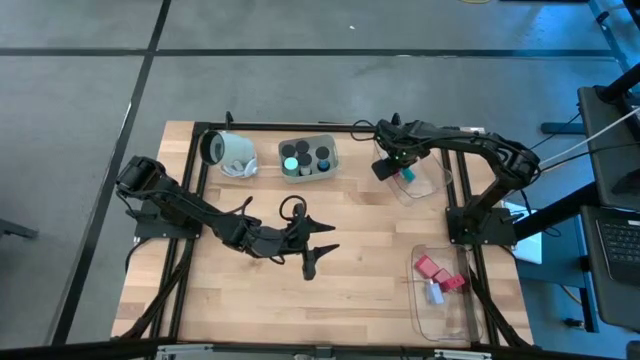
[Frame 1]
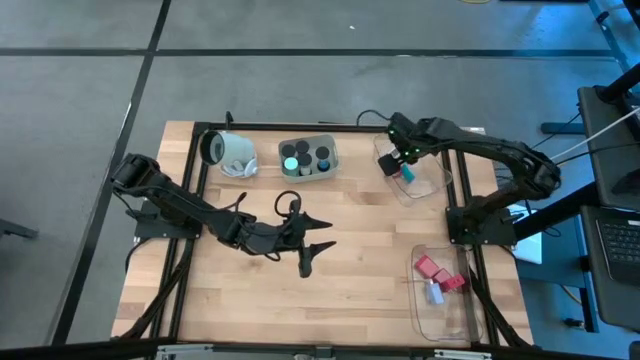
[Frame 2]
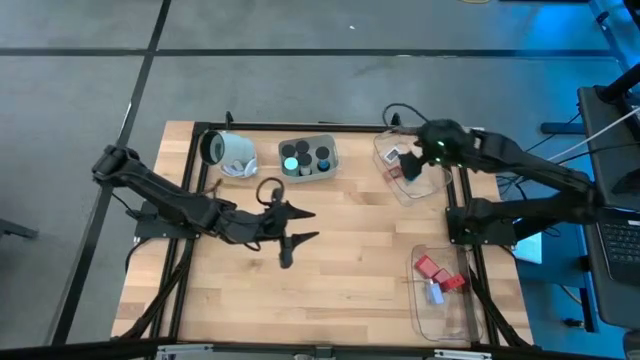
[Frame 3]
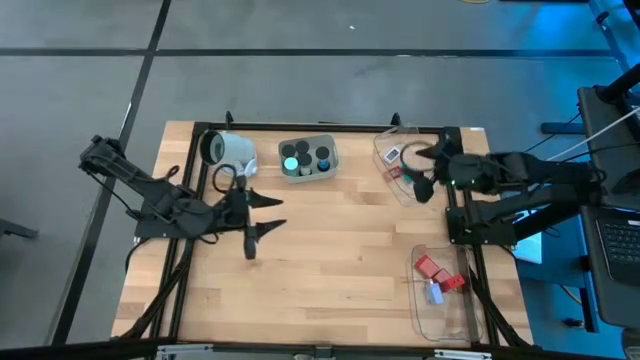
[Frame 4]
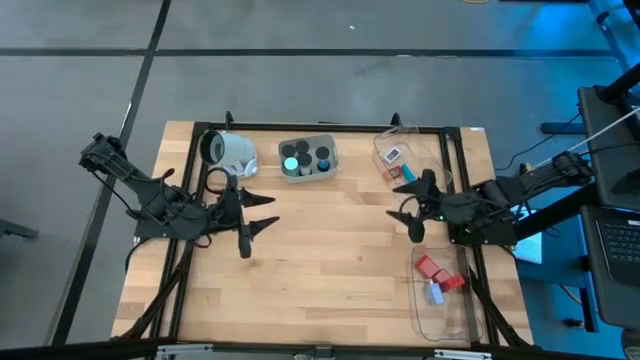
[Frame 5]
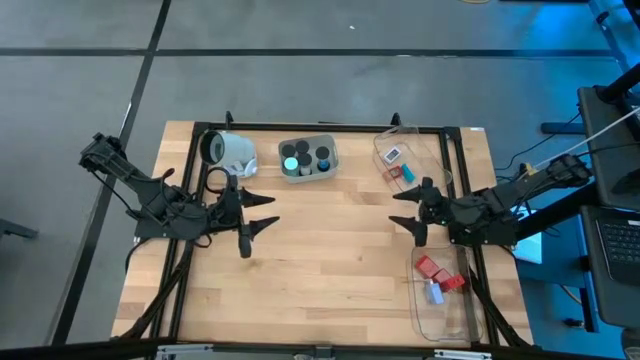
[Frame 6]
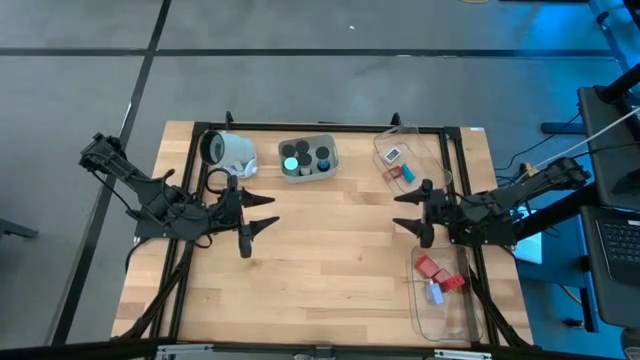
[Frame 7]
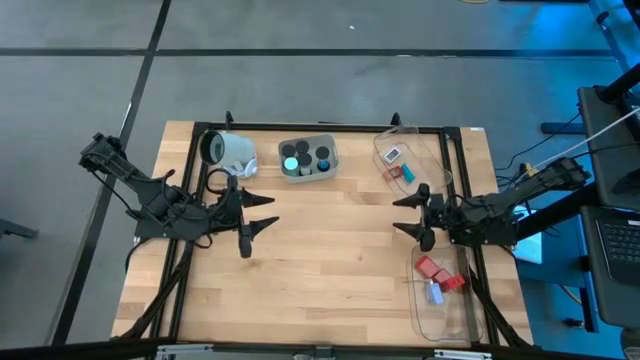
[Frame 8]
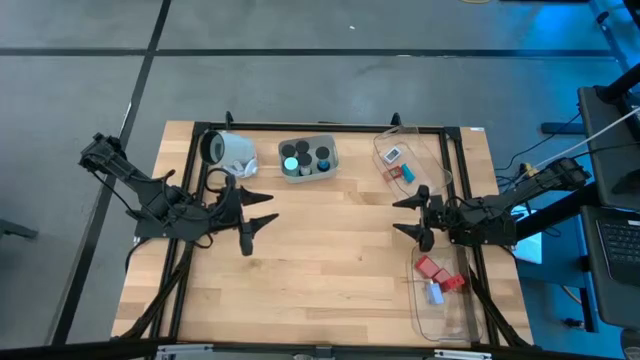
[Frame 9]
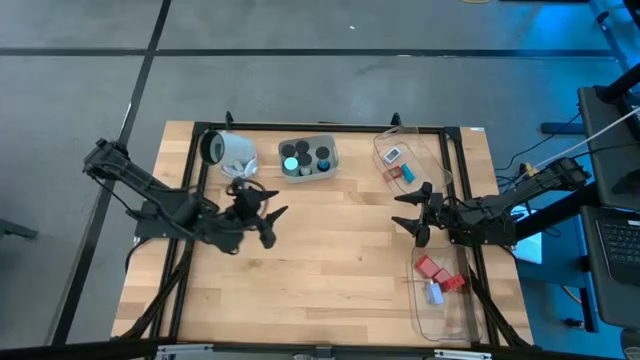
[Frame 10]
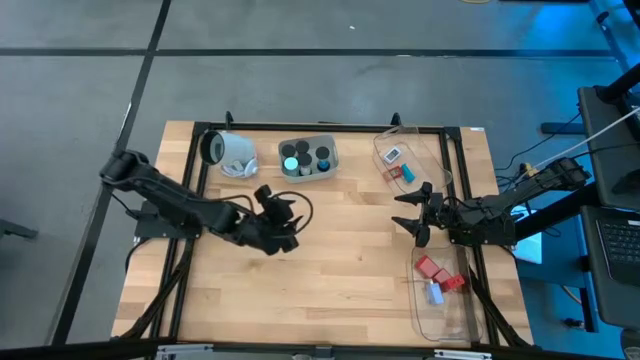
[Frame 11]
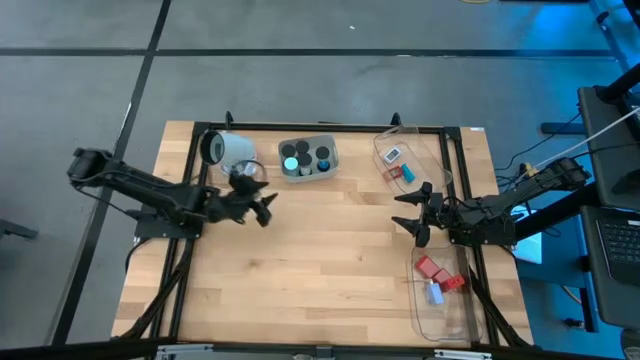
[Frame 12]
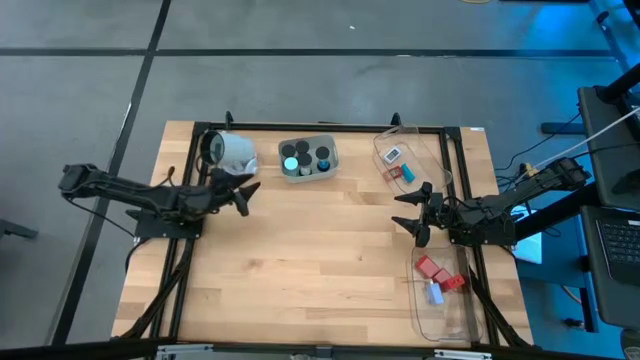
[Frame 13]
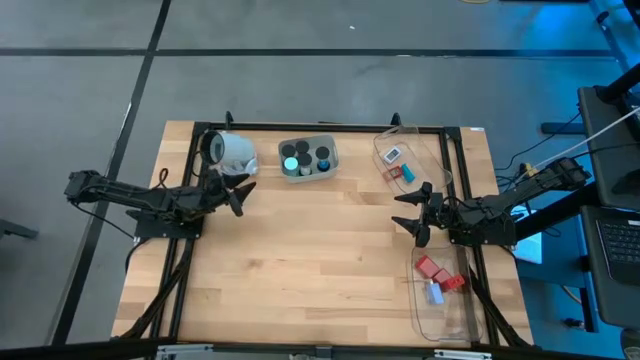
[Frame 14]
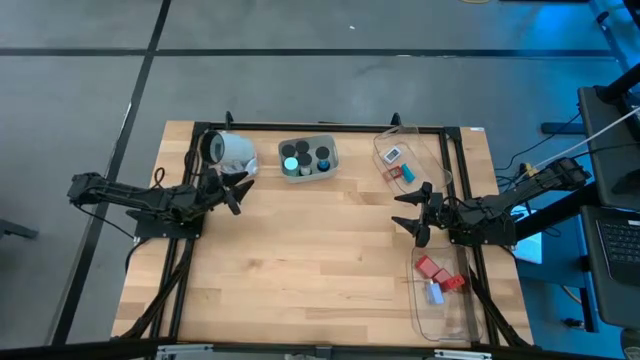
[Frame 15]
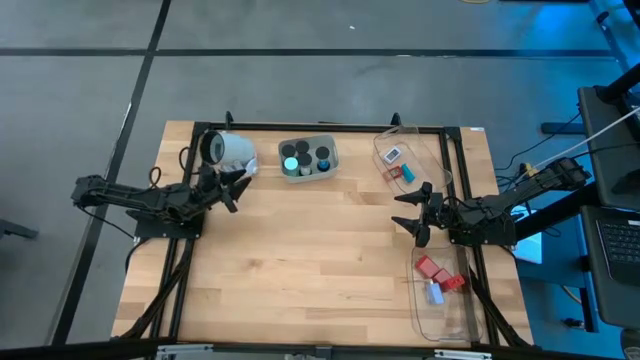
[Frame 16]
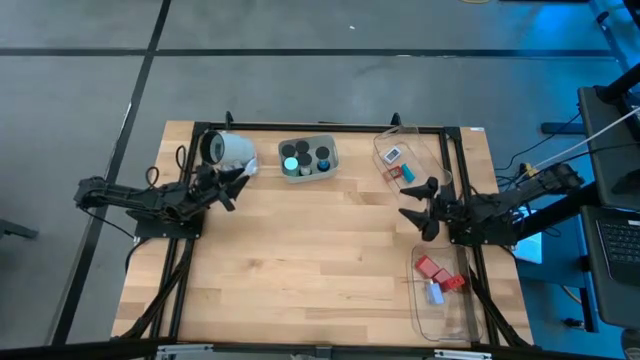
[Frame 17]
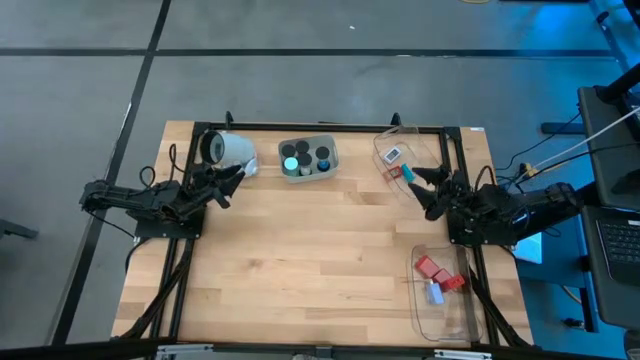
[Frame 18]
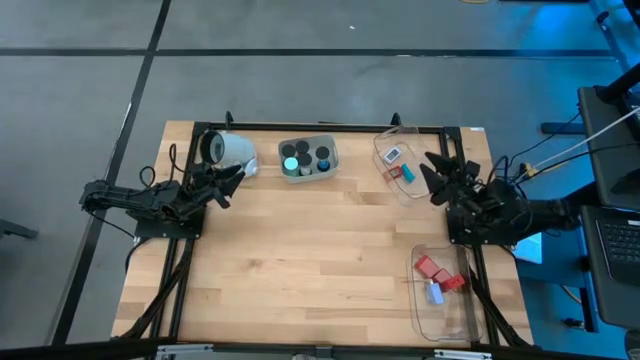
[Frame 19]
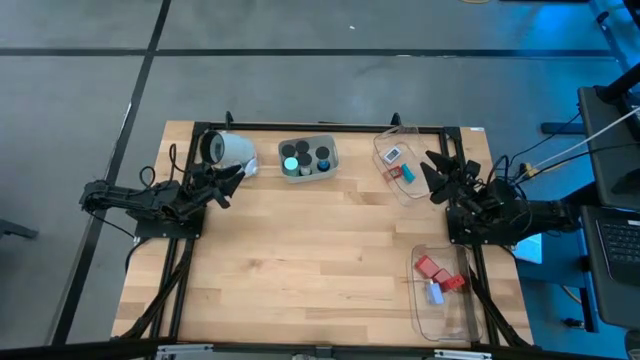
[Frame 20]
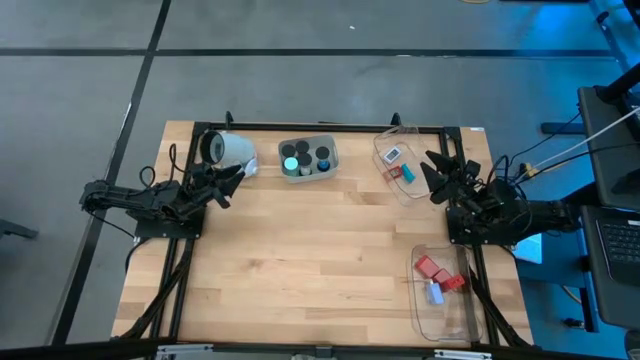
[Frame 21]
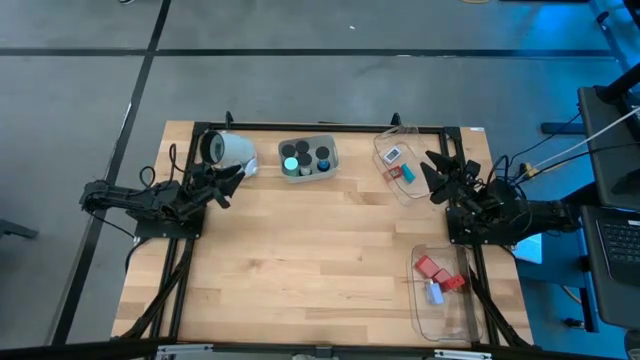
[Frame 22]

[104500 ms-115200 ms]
Task: Pick & Place Office items
Return to Home Position

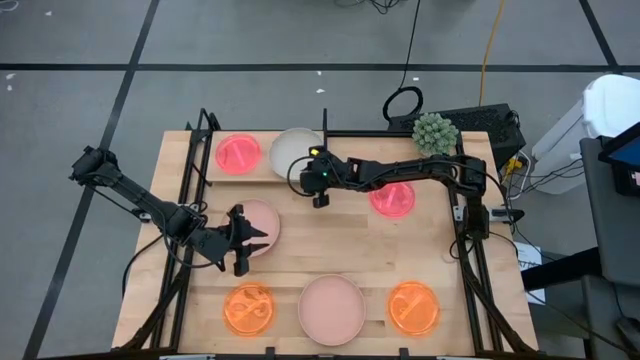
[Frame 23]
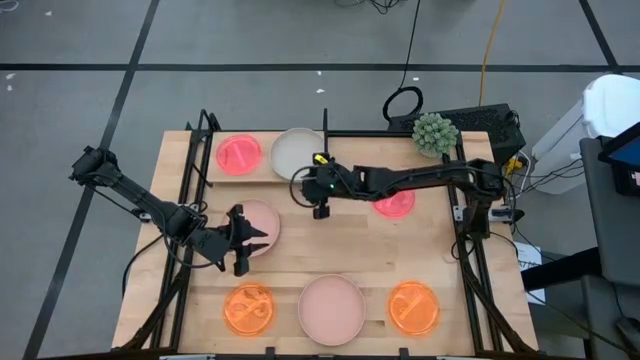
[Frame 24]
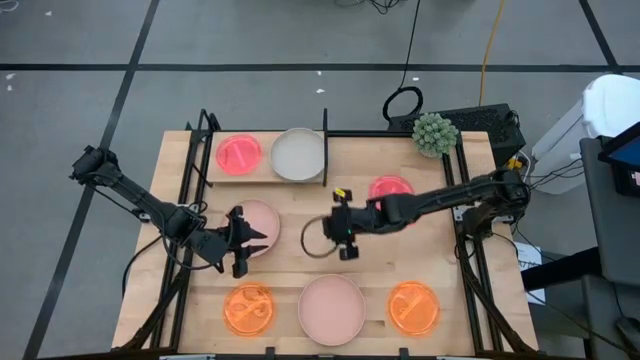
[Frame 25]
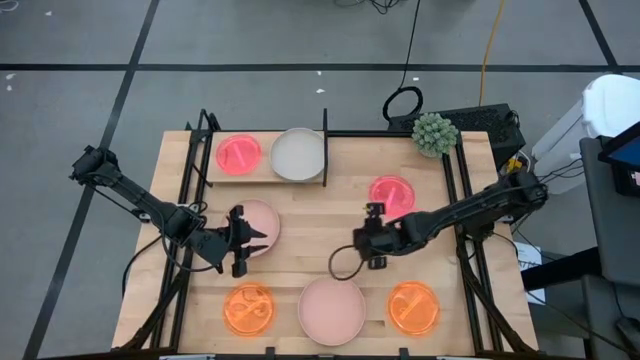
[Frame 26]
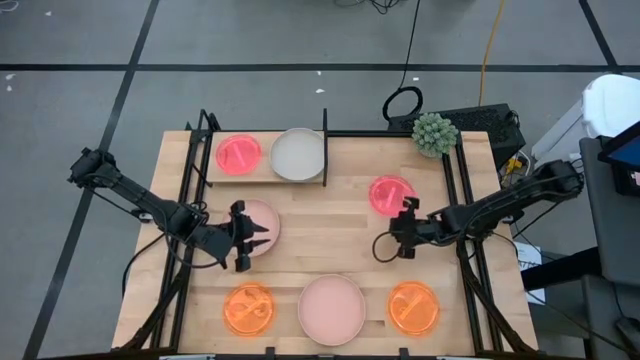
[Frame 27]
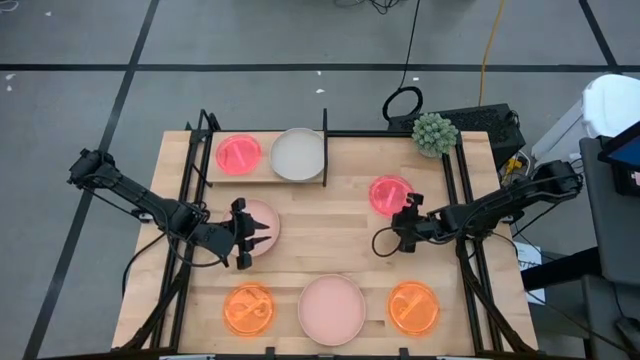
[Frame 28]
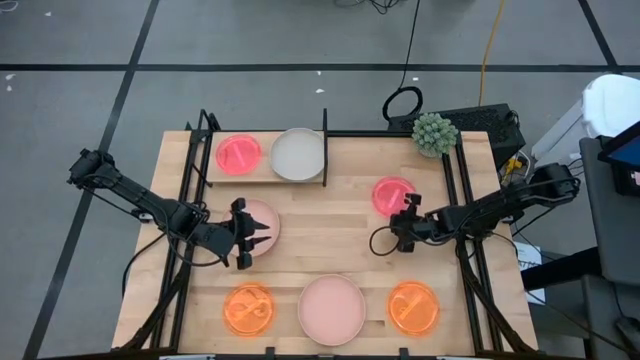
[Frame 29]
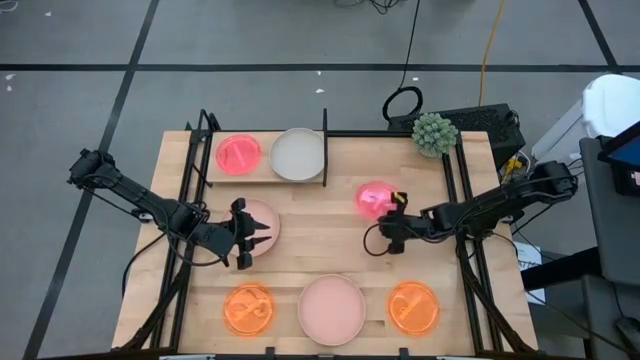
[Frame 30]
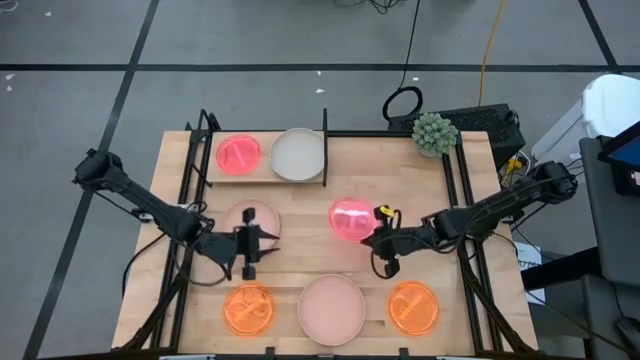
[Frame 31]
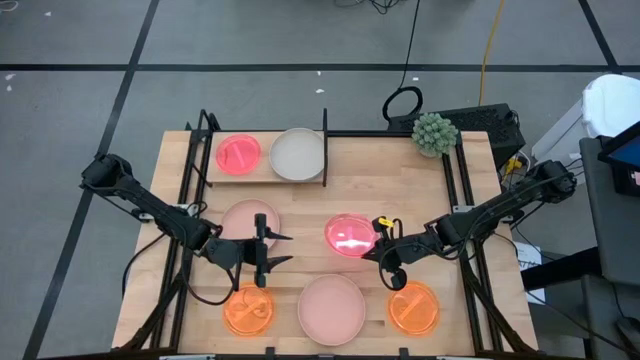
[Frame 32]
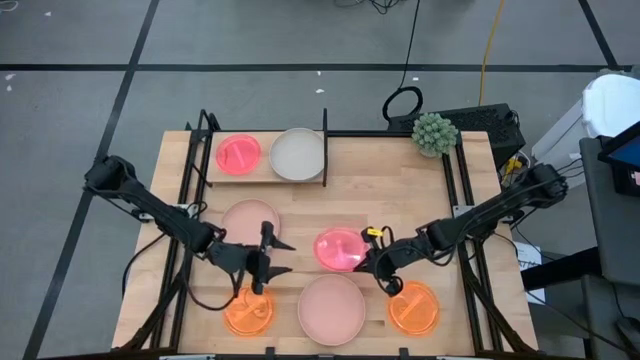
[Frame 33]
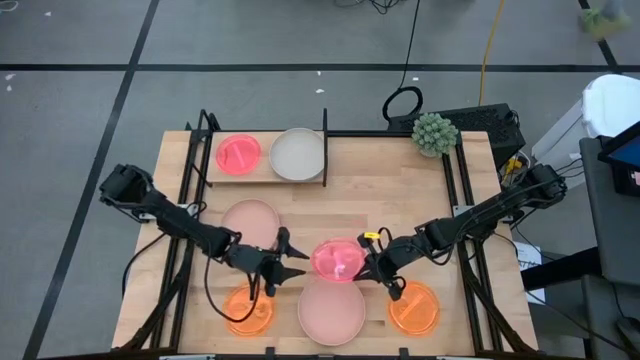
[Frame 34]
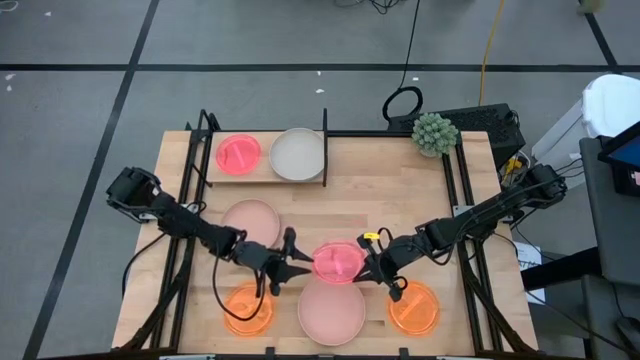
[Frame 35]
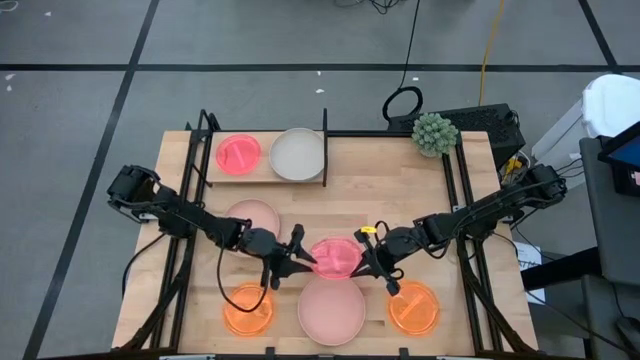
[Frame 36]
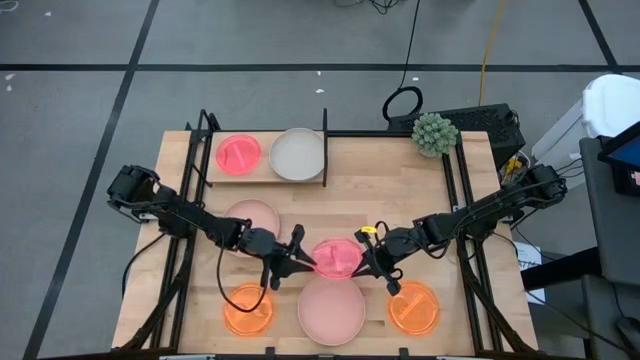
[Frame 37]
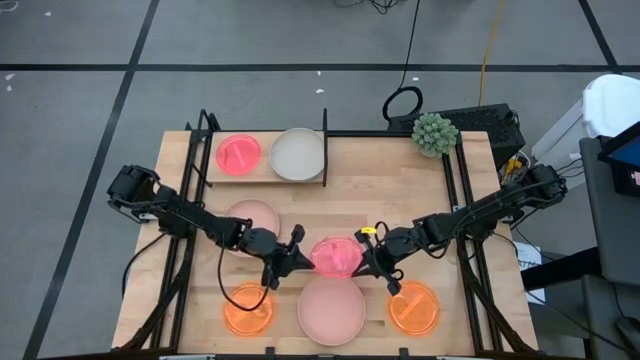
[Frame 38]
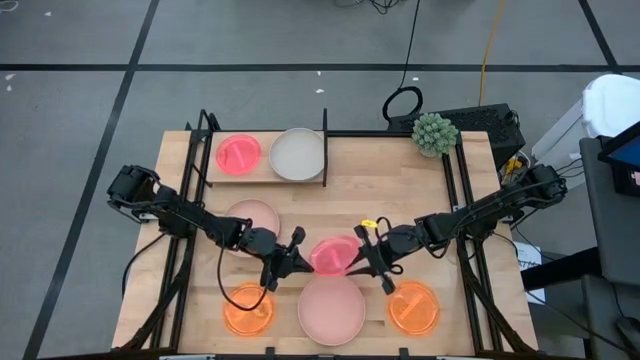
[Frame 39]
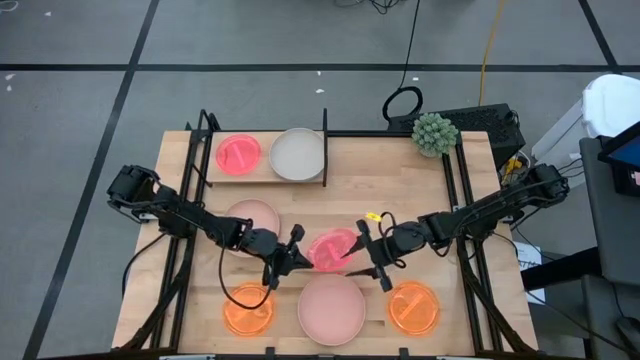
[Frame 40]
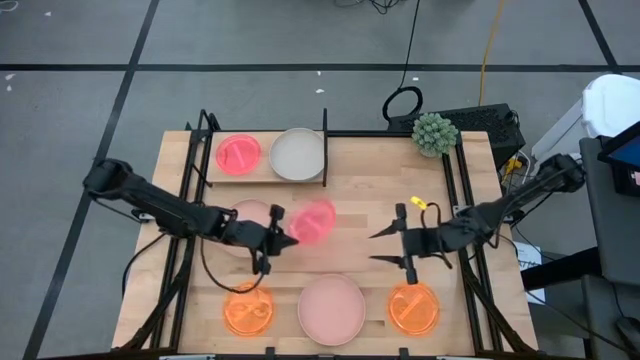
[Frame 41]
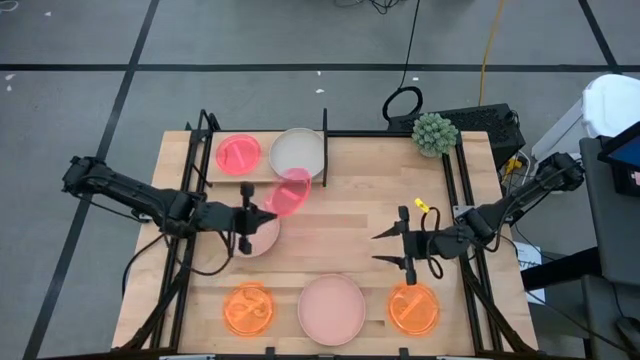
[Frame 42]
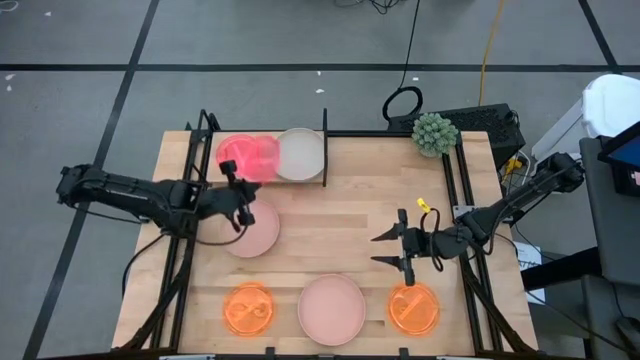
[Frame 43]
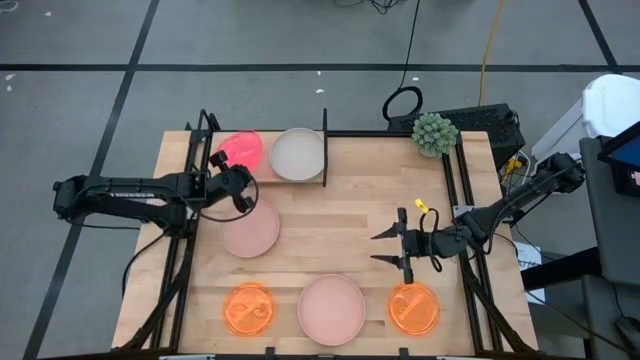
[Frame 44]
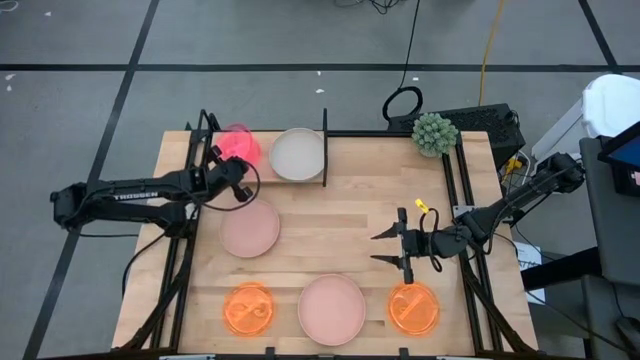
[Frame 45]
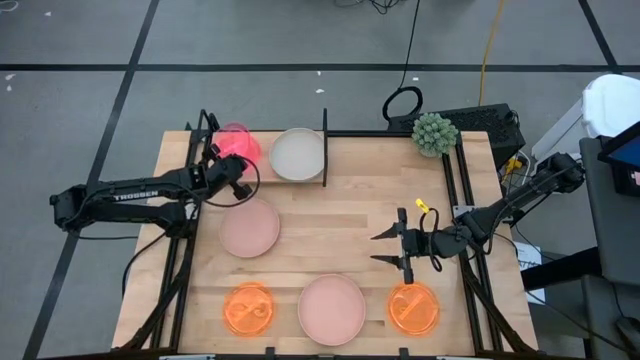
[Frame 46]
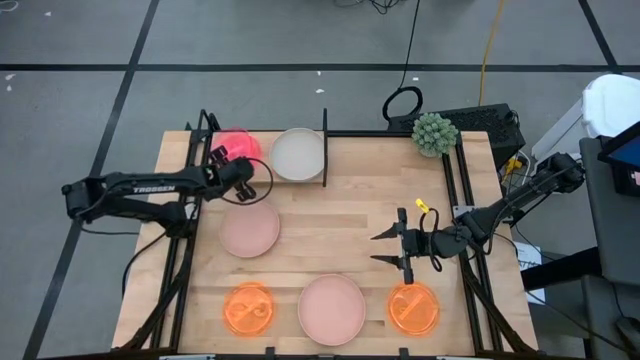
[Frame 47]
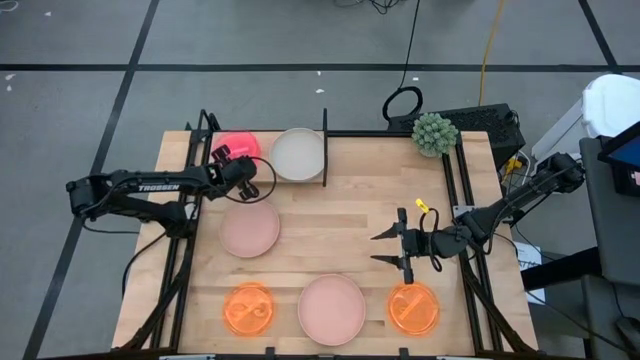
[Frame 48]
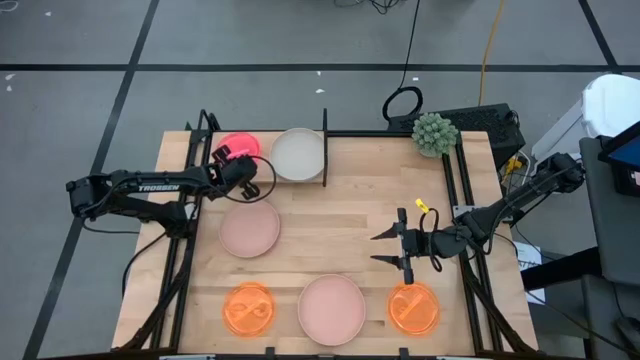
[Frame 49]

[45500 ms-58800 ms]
Task: Place and stack plates onto a shelf
Stack the pink transparent plate on top of the pink transparent plate on the shelf
